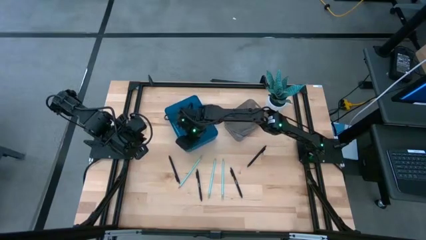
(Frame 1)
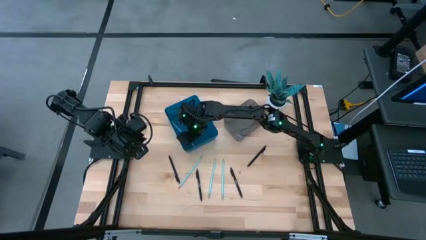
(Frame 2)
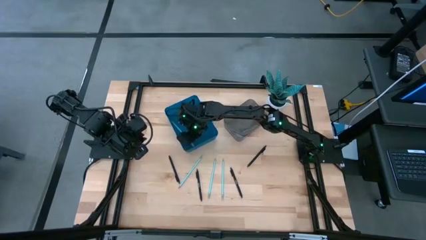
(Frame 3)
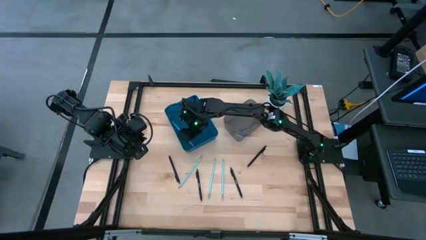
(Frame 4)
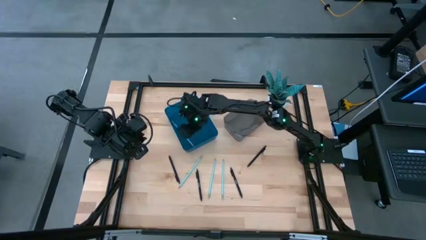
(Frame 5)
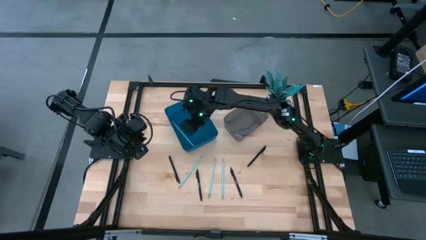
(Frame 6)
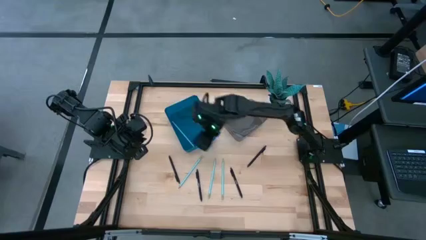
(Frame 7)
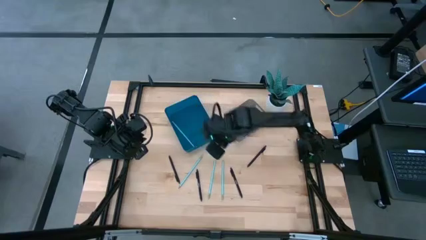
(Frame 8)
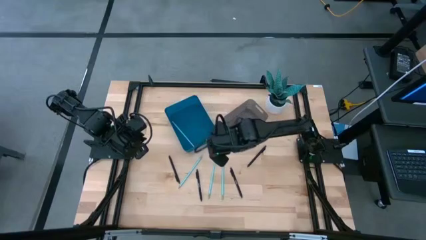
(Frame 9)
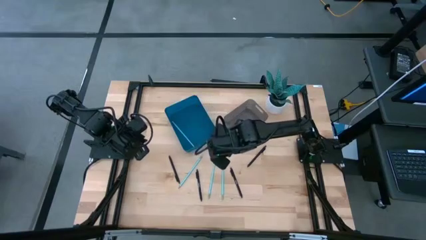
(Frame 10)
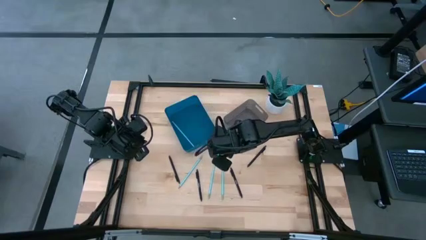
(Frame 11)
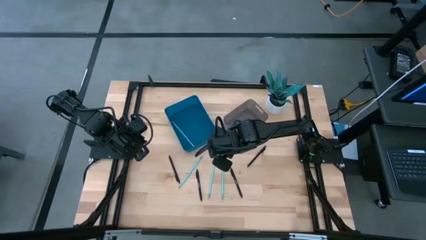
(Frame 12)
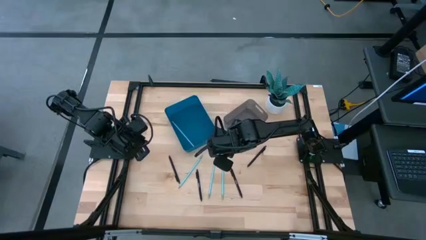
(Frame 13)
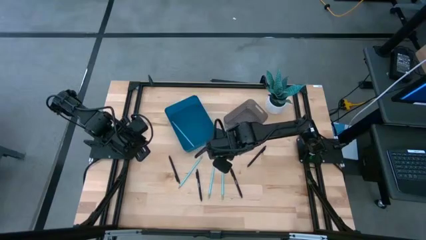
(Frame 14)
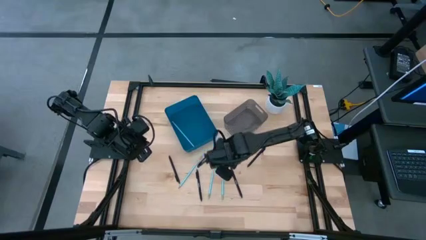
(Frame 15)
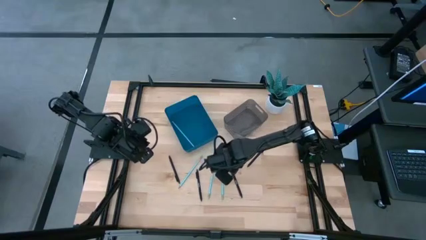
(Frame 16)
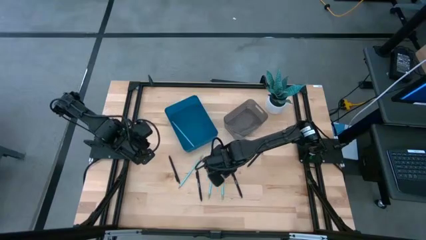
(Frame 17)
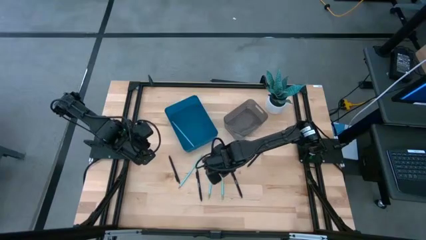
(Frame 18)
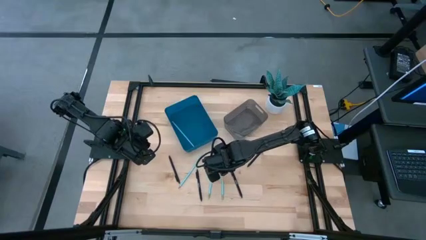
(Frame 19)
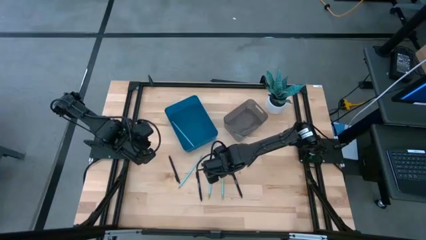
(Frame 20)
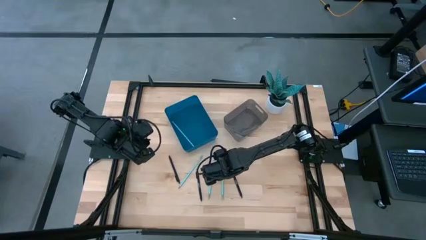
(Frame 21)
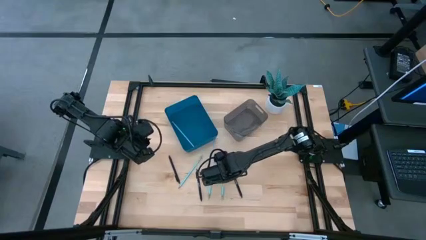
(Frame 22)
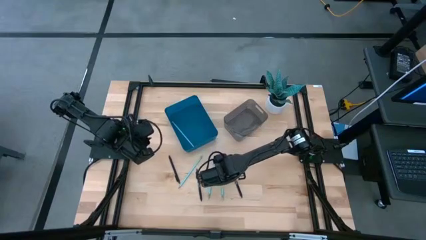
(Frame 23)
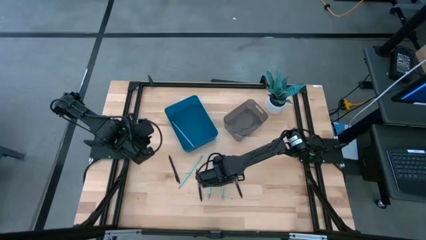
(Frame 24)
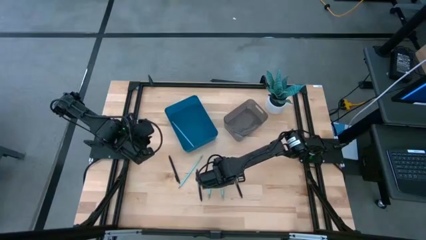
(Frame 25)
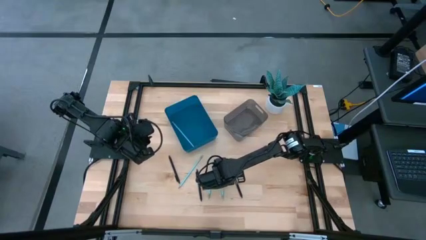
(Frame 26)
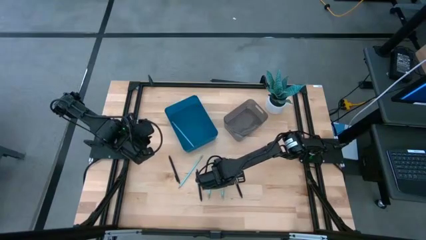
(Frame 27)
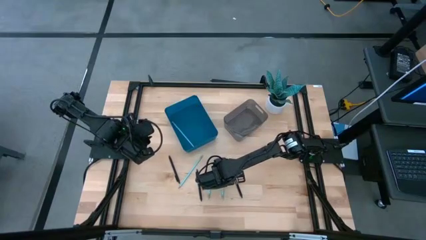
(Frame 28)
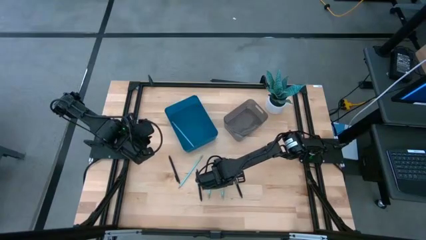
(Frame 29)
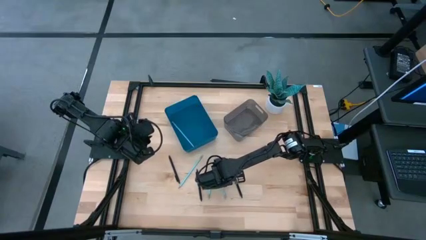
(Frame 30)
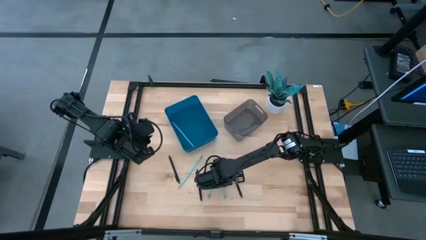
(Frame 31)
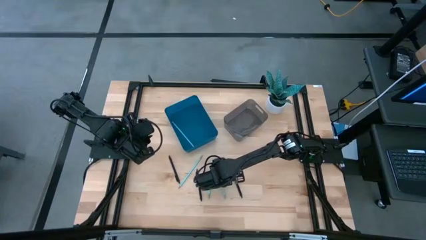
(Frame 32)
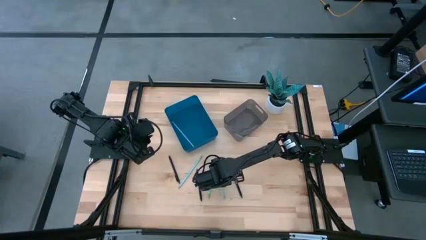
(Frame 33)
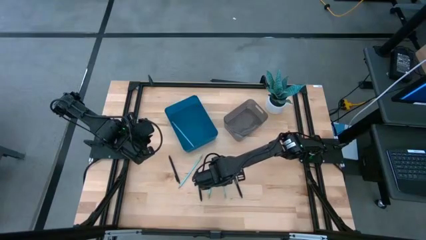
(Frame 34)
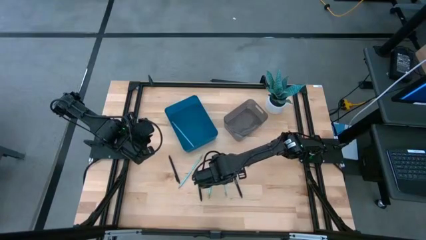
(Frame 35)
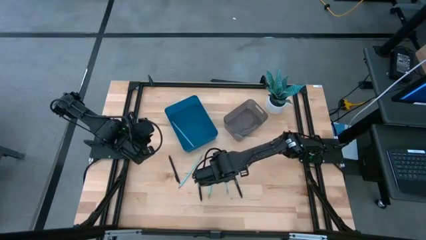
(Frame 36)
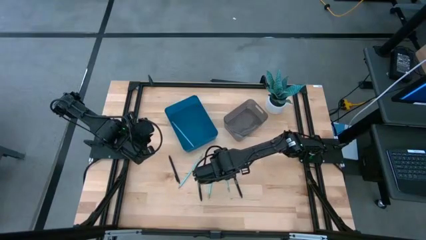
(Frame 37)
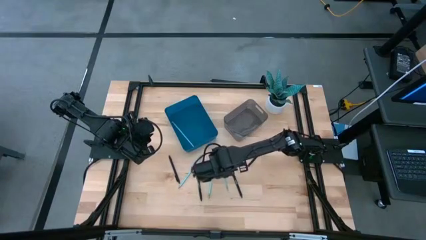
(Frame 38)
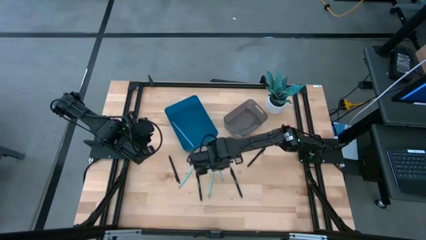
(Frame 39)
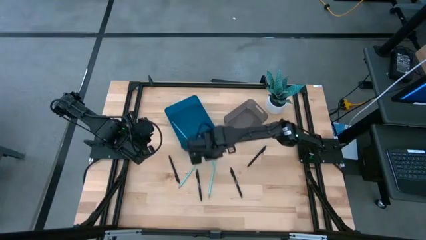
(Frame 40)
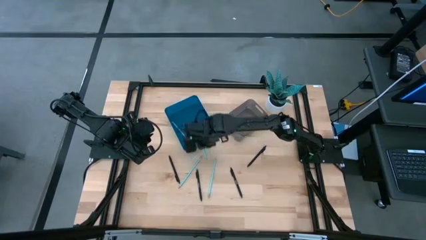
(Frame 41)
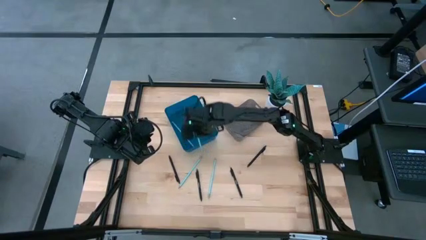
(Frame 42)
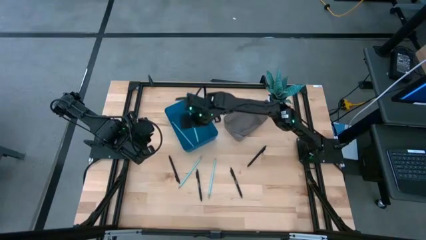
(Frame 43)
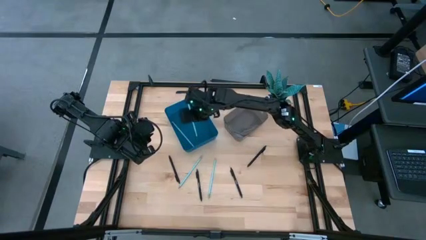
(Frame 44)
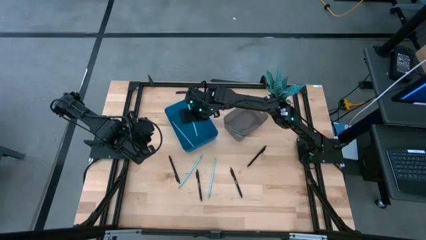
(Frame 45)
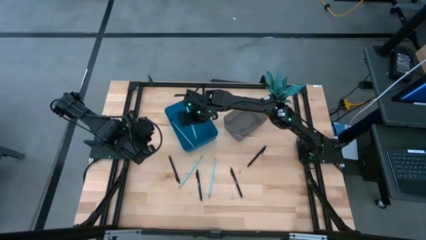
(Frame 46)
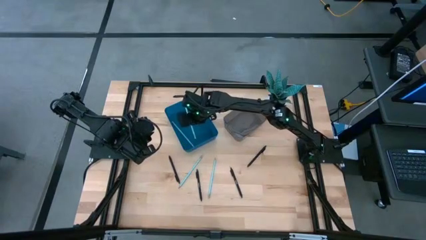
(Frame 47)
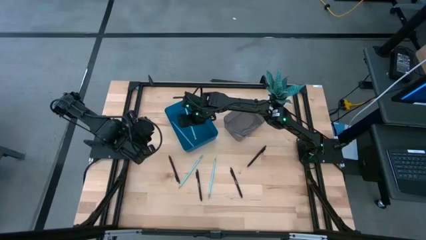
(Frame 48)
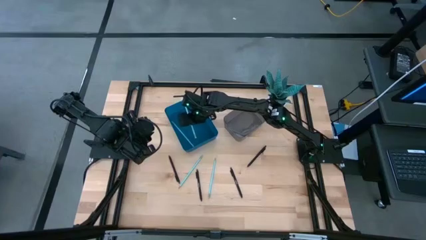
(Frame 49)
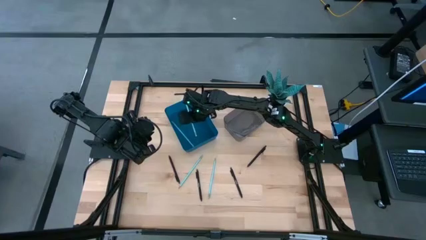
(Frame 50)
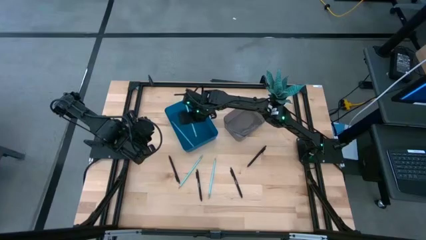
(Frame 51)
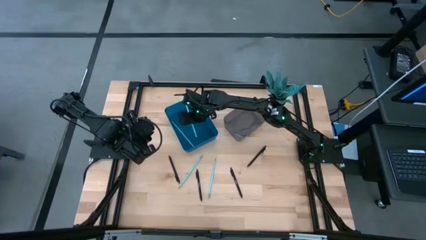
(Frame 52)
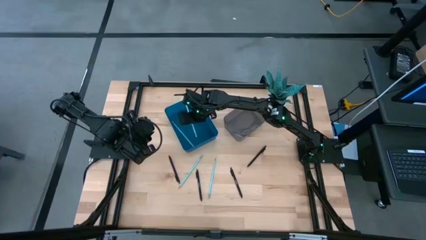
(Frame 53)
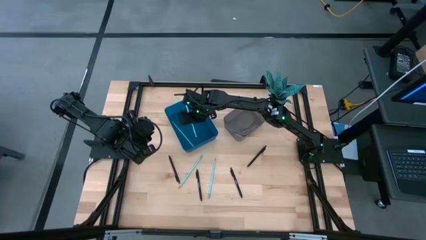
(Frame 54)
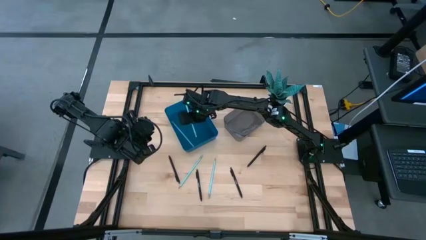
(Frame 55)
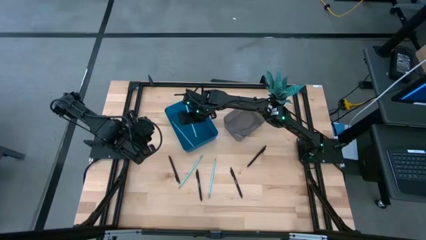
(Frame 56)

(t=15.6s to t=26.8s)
Task: Sort pens & pencils
Put the right light blue pencil into the blue bin

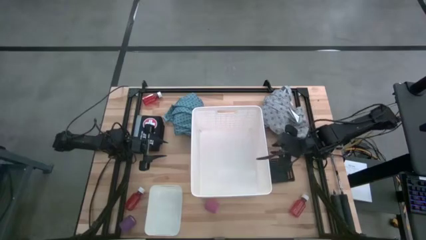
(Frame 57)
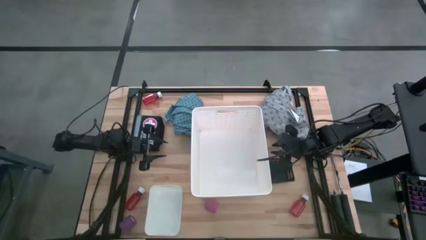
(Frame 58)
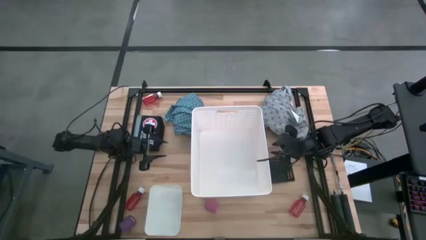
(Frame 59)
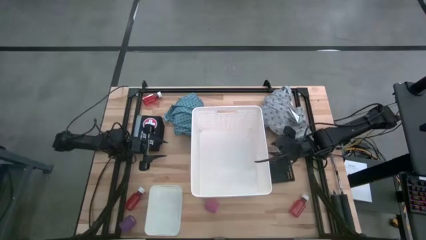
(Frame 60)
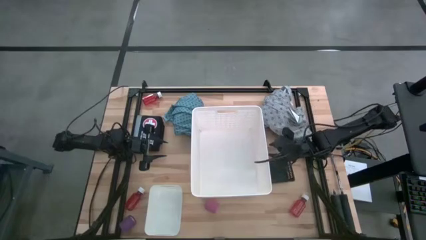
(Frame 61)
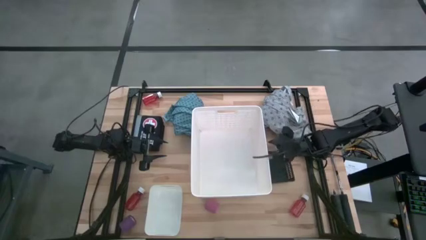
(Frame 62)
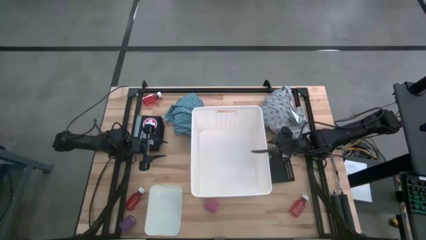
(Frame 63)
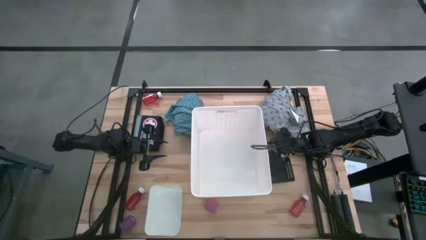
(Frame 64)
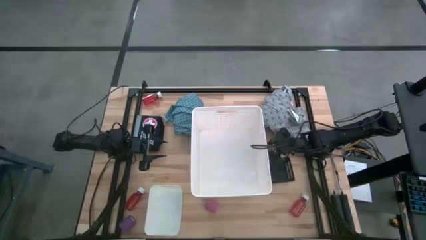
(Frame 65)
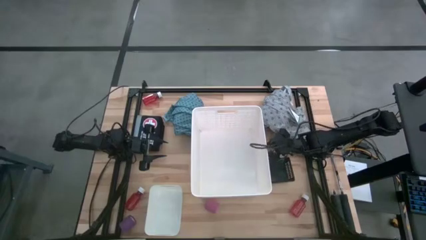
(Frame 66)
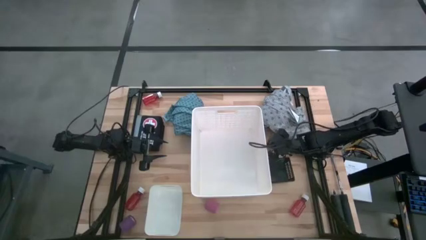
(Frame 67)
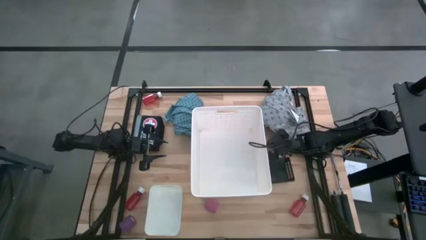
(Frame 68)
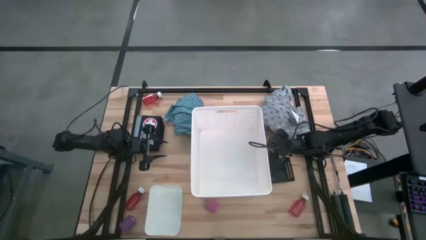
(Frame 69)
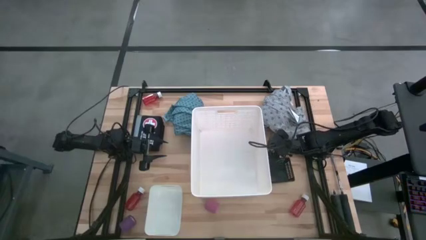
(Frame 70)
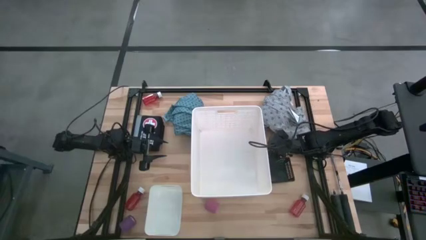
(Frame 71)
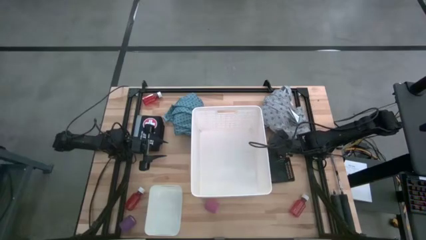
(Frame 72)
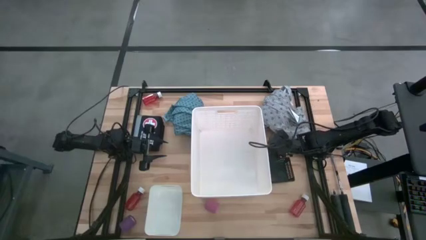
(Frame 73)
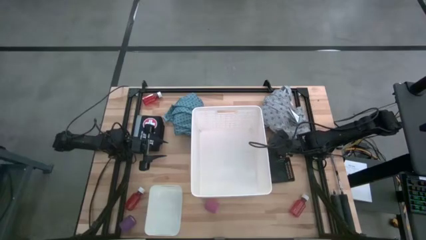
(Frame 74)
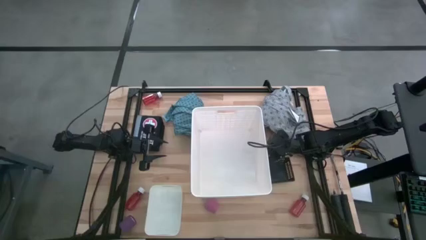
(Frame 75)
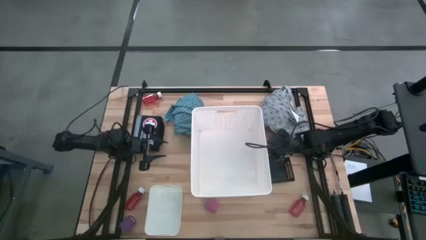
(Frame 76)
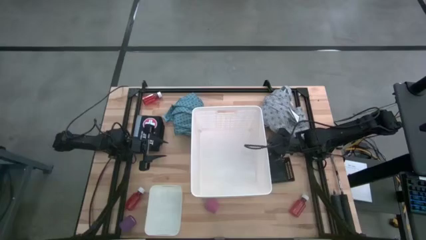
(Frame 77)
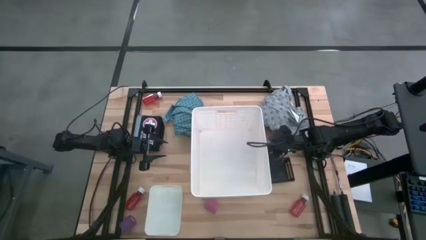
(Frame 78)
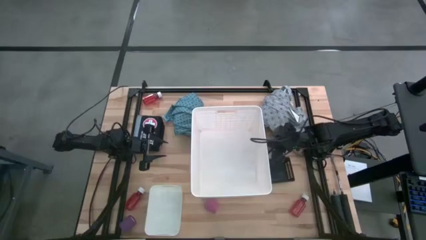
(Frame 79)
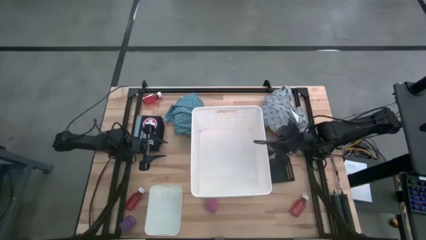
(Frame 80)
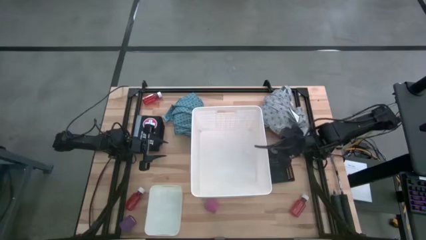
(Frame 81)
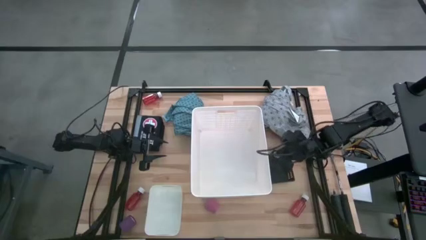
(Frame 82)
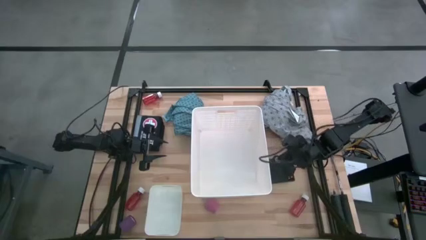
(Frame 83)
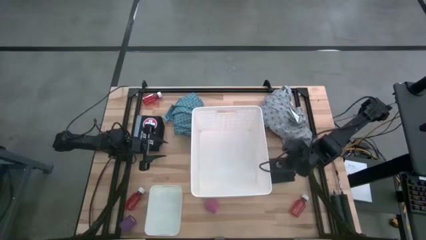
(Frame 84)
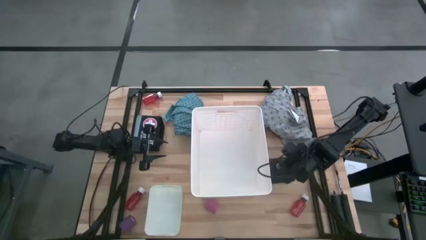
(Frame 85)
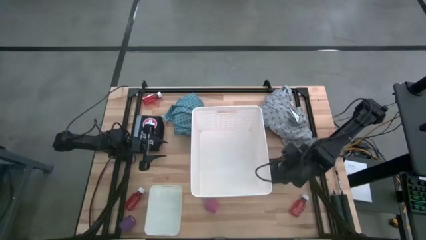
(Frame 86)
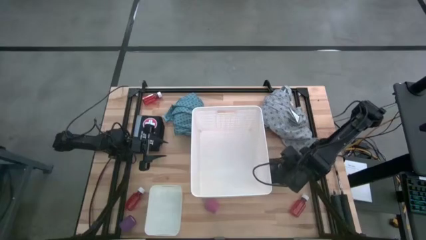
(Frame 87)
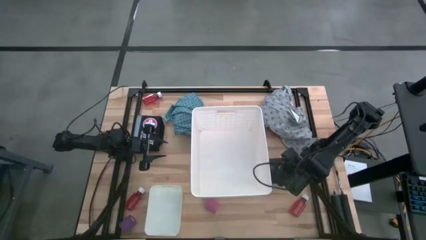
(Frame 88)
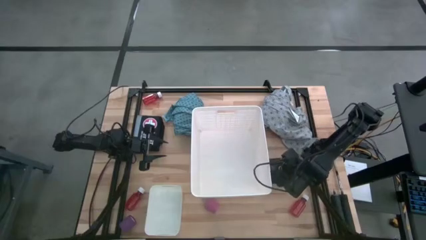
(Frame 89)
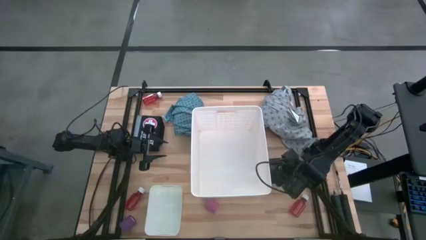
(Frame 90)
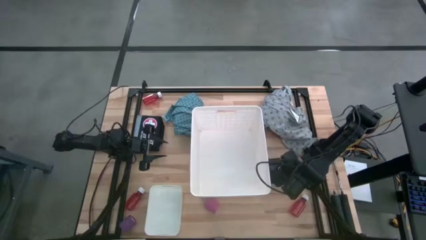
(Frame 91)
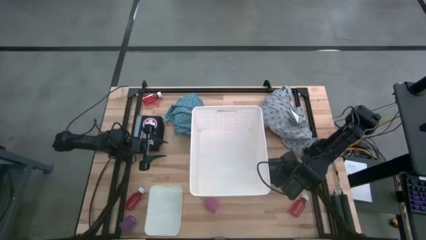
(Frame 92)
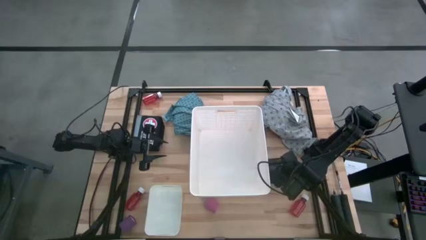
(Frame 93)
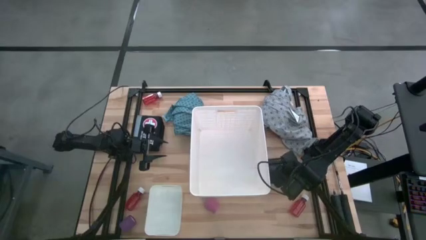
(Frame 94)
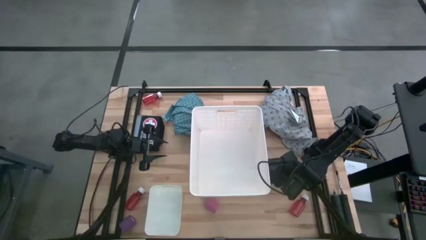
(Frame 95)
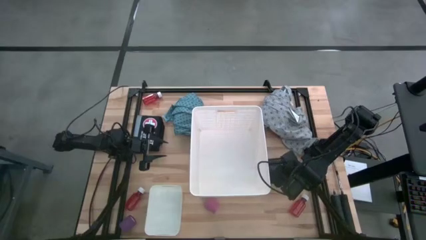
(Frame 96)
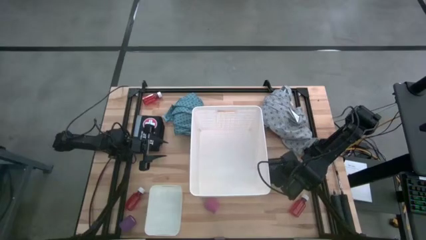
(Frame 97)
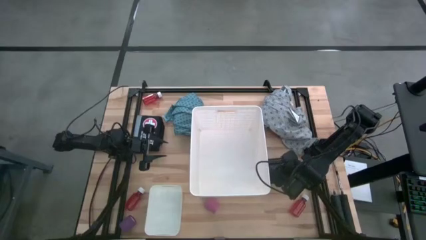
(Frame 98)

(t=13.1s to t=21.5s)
Task: Pick & place medical supplies in basket/bin
Put the black bandage into the black bin
